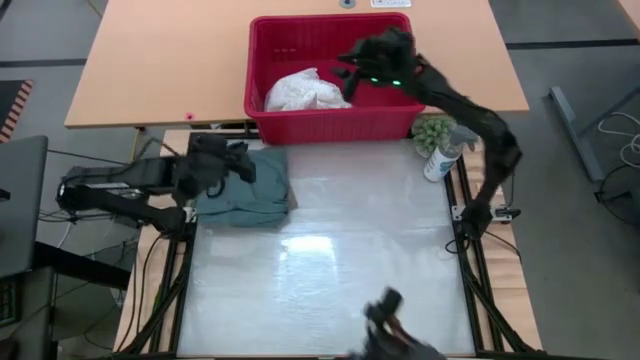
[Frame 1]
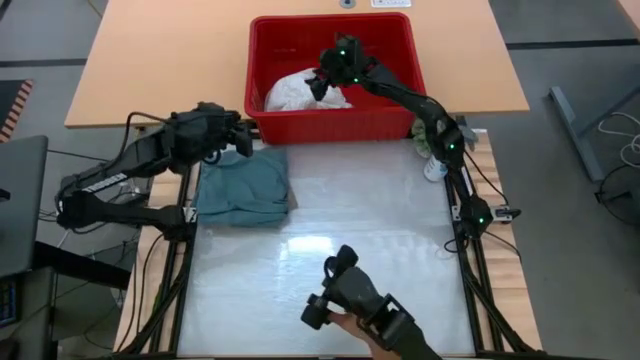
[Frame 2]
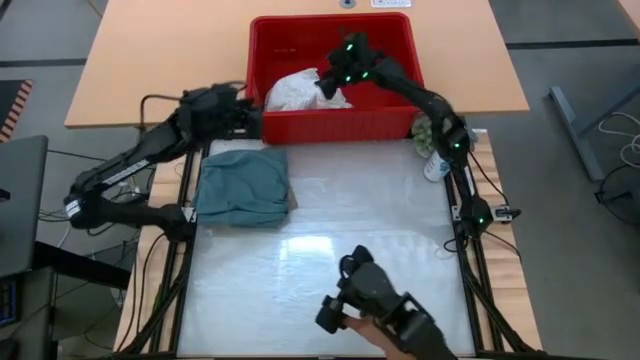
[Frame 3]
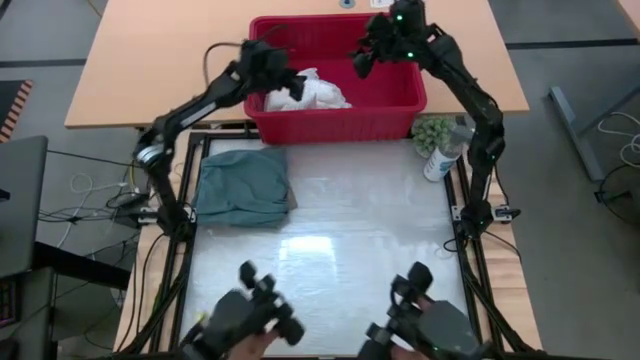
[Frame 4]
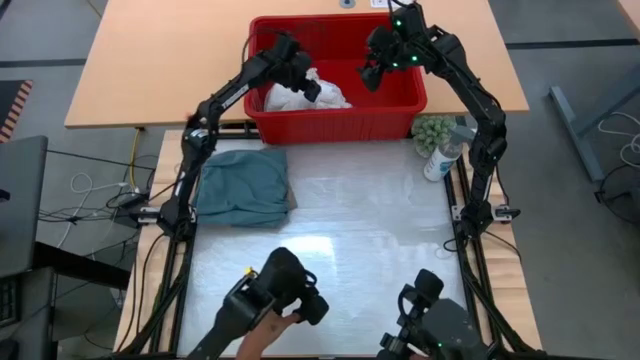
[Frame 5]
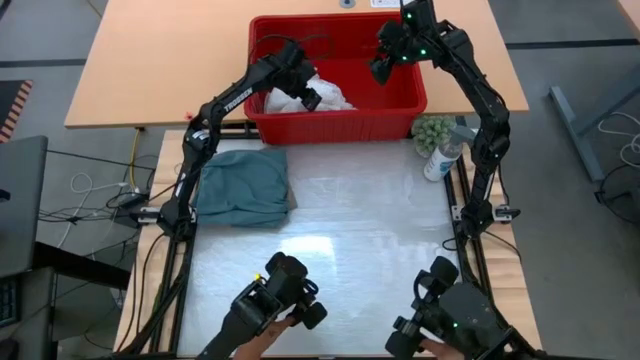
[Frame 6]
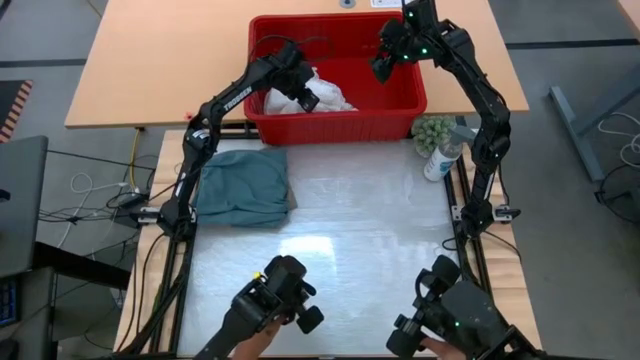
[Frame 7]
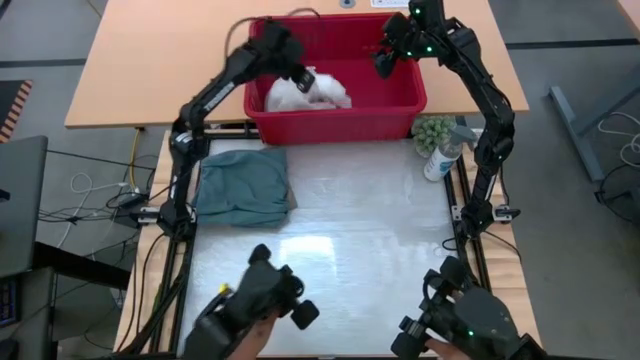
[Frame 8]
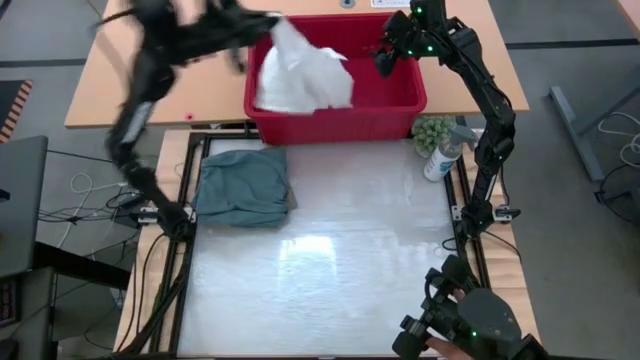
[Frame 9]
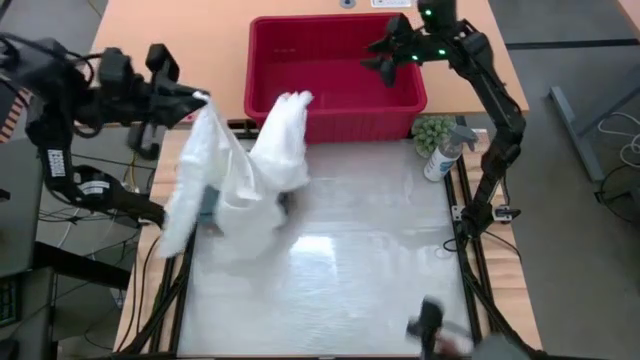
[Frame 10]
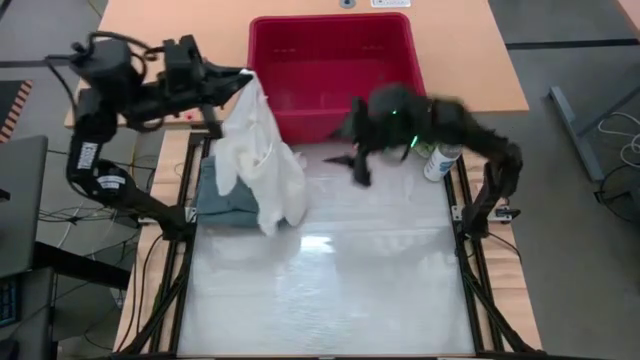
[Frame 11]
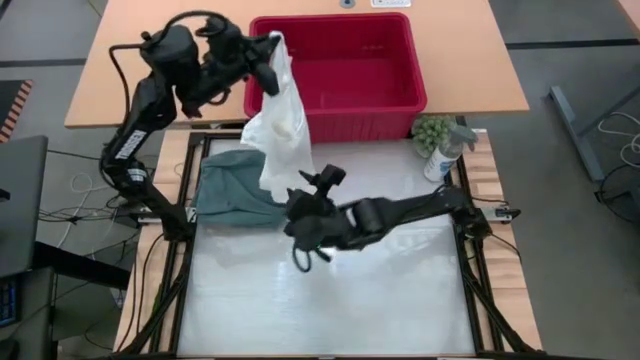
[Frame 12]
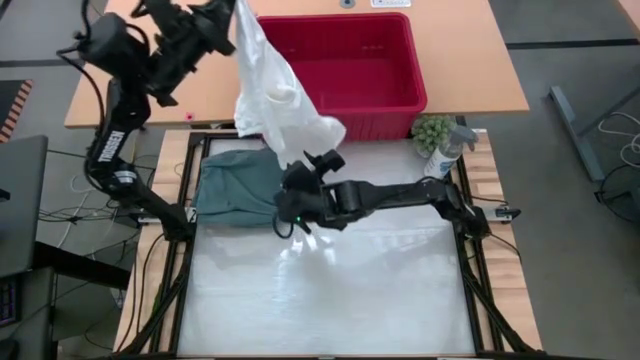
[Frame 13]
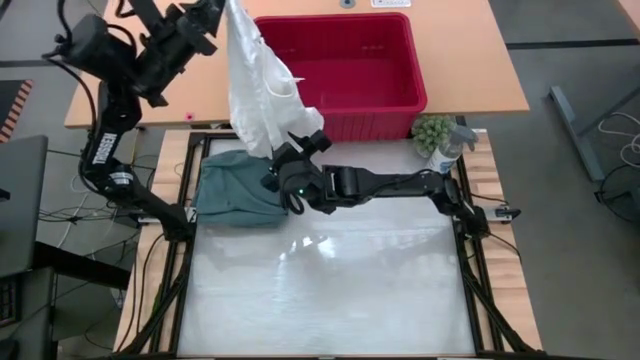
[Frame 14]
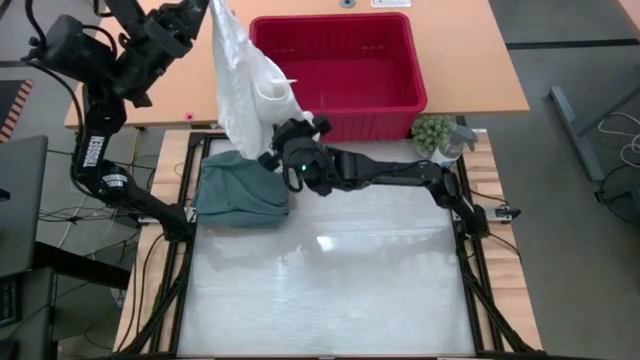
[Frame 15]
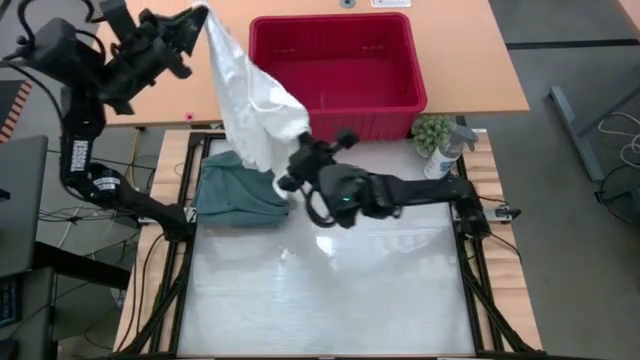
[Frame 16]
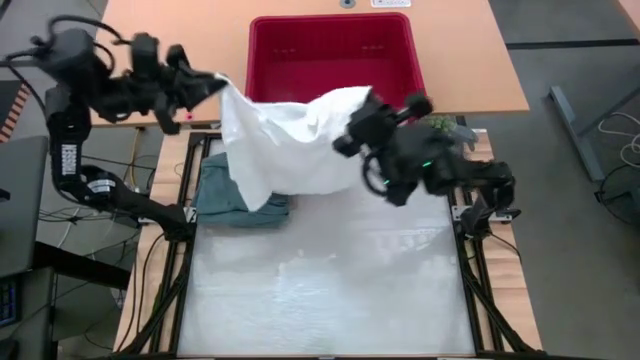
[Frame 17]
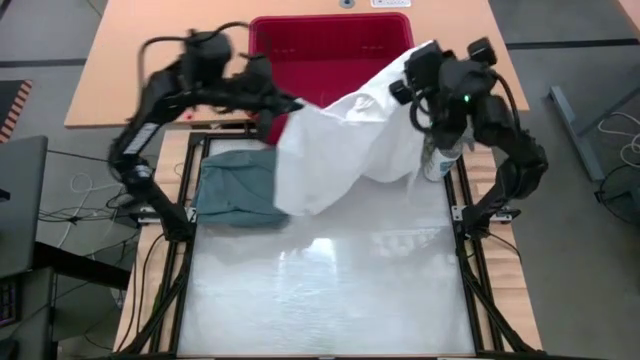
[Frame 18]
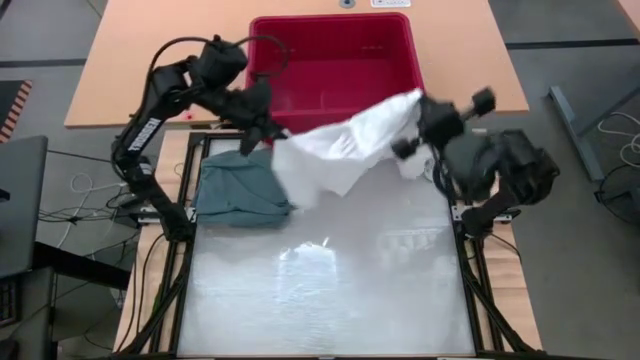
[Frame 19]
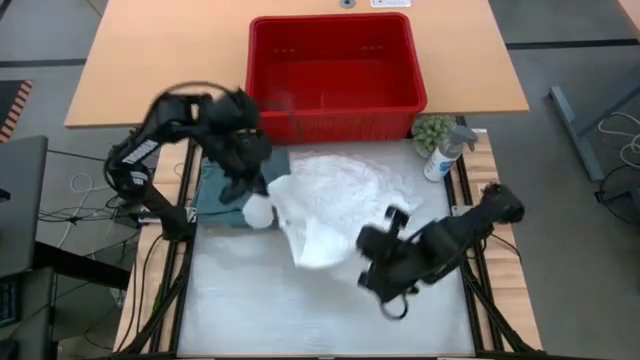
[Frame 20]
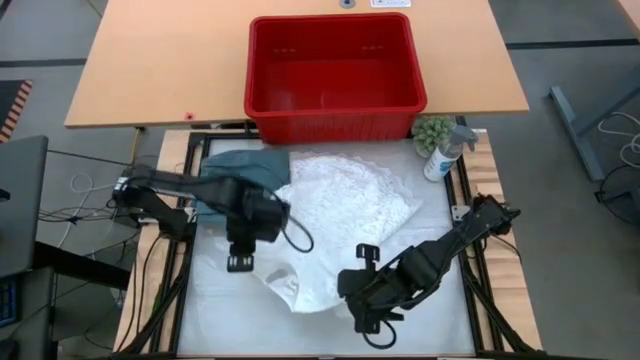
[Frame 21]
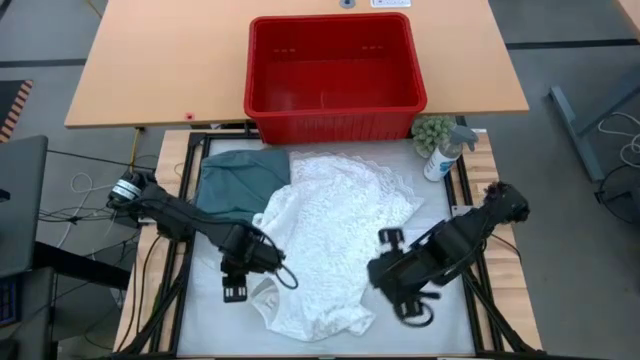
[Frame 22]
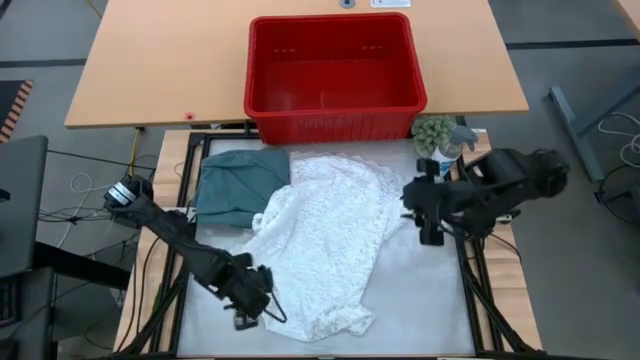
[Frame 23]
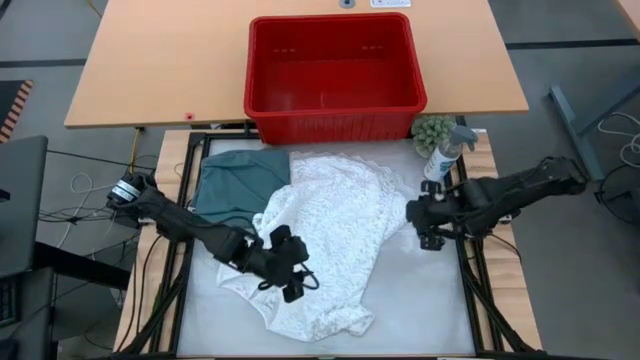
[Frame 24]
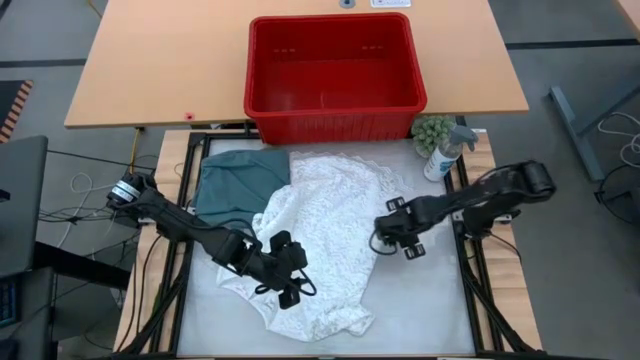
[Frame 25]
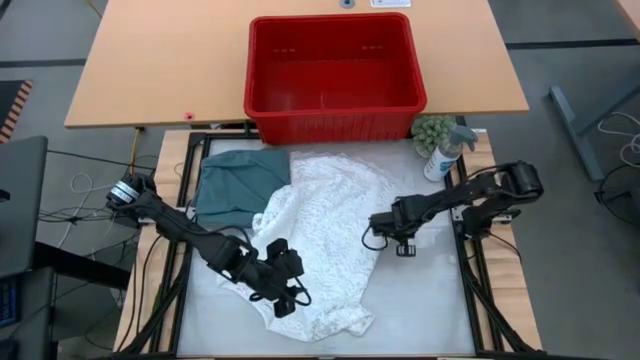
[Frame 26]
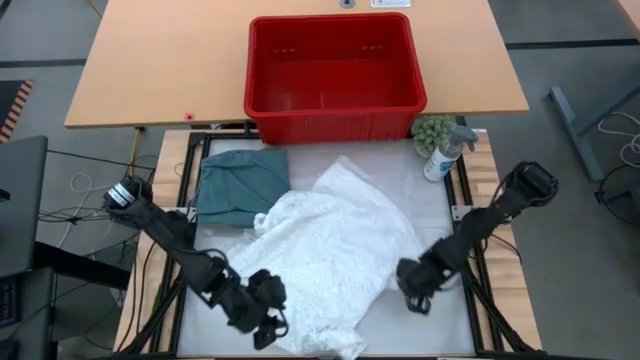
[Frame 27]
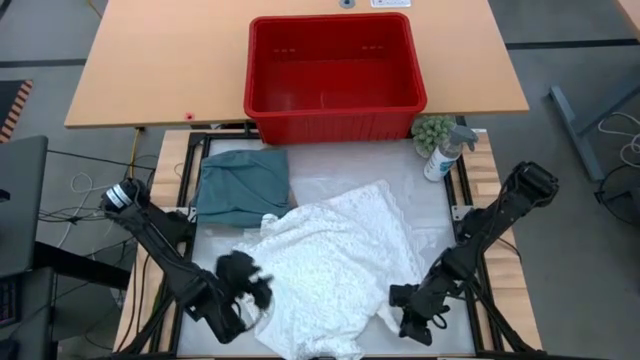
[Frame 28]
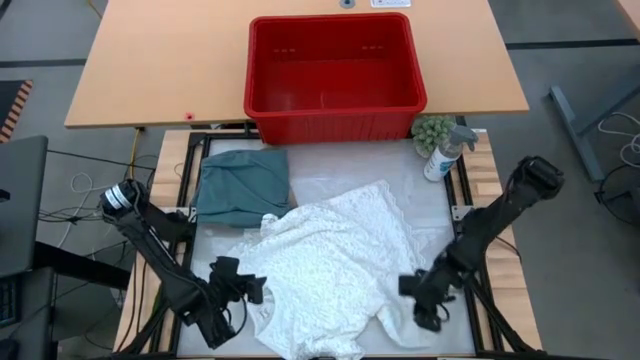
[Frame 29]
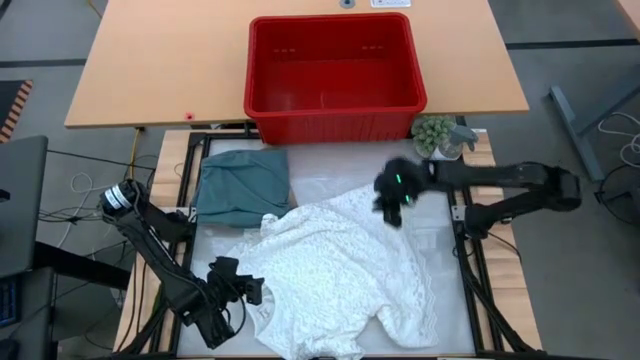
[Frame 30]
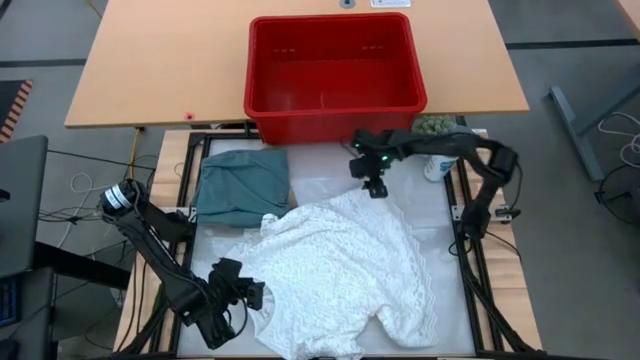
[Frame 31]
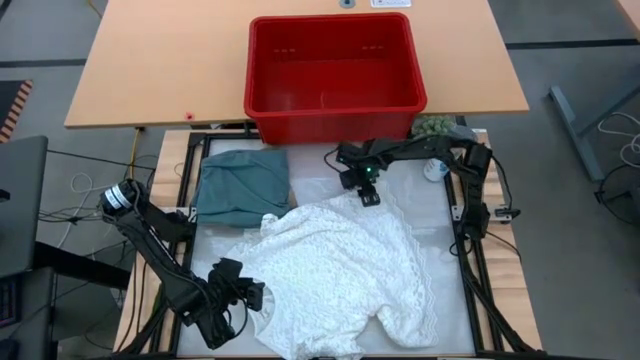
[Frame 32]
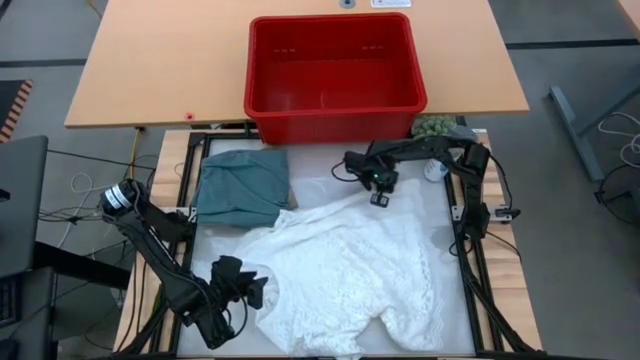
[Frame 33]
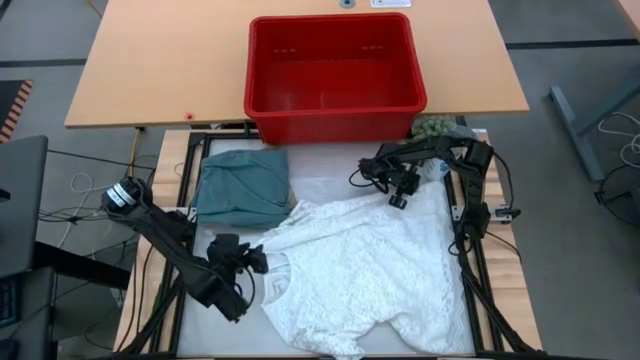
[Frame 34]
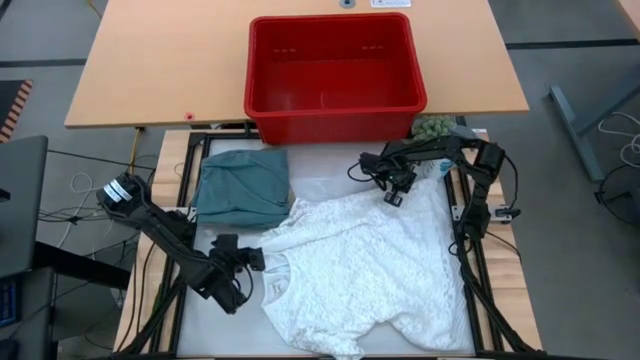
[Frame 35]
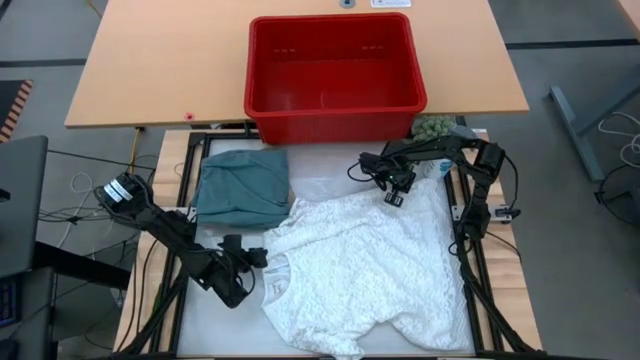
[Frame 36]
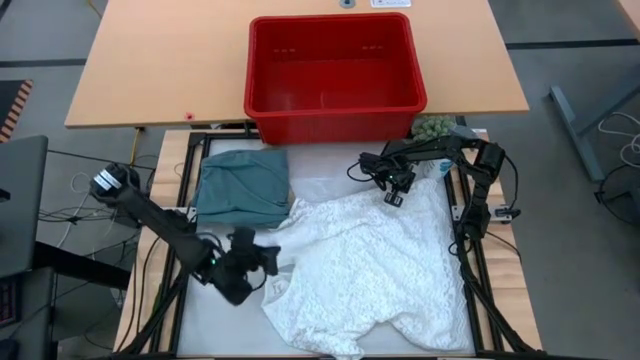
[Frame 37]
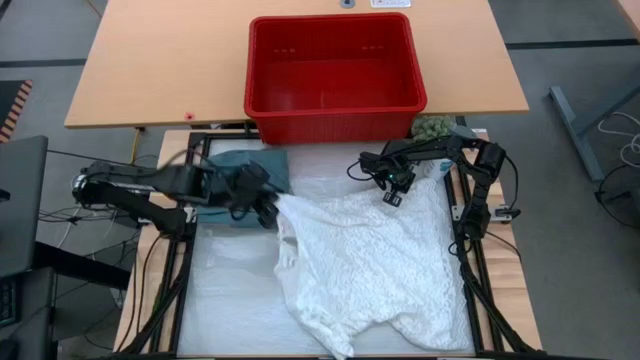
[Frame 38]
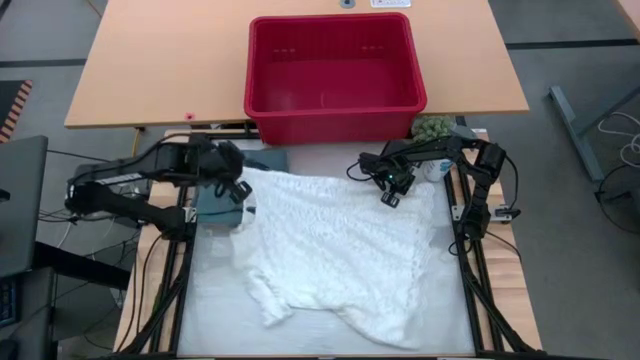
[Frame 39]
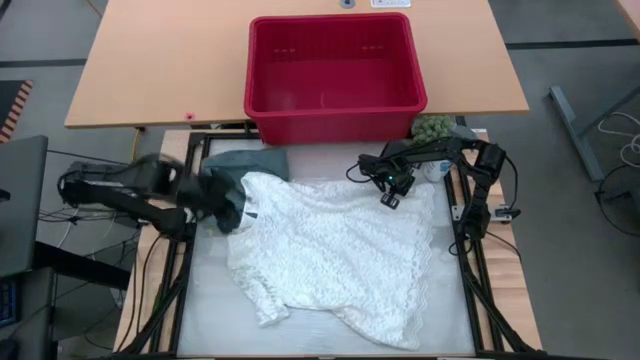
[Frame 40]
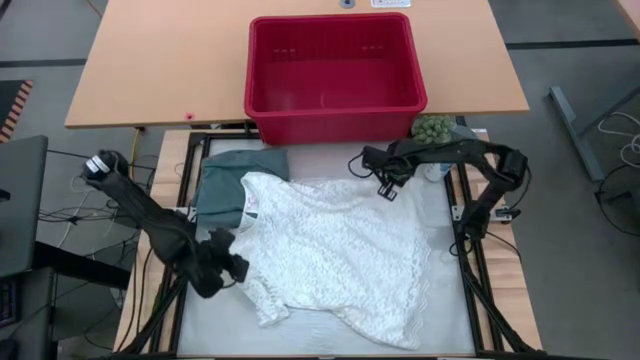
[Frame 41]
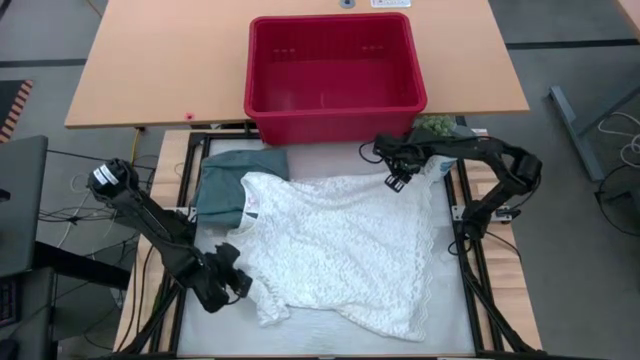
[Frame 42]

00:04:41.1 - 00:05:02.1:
Task: Fold Laundry from Bin
Fold the white shirt in the red bin

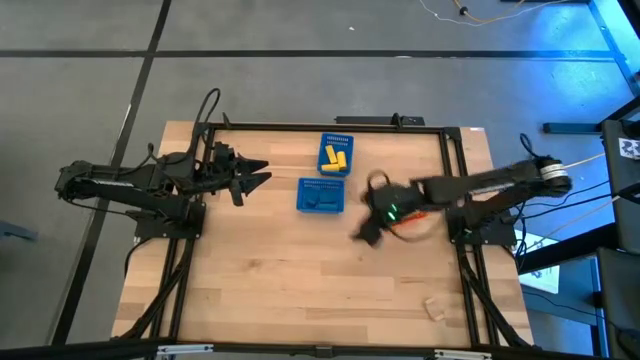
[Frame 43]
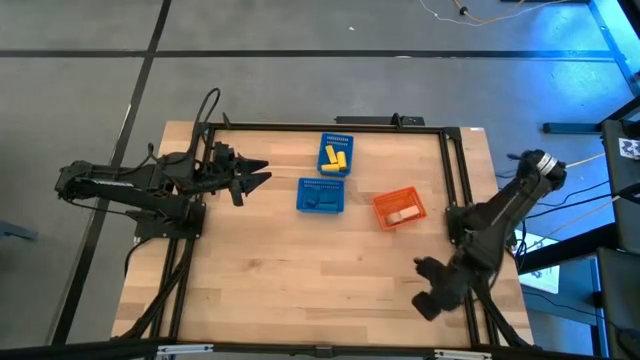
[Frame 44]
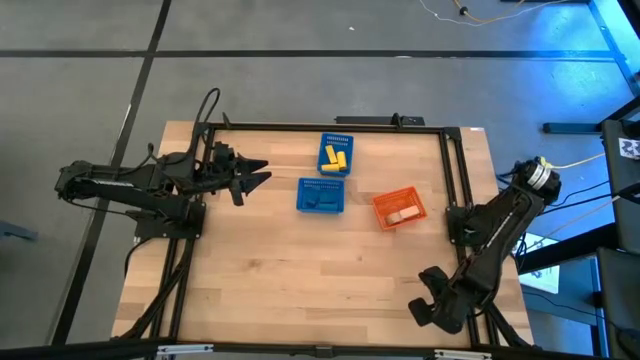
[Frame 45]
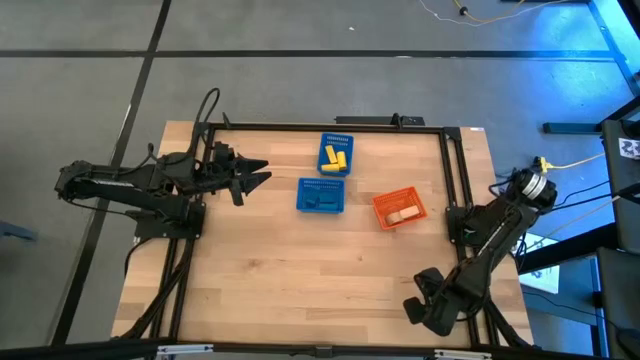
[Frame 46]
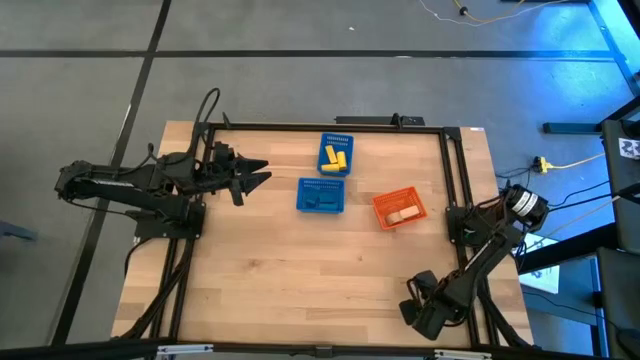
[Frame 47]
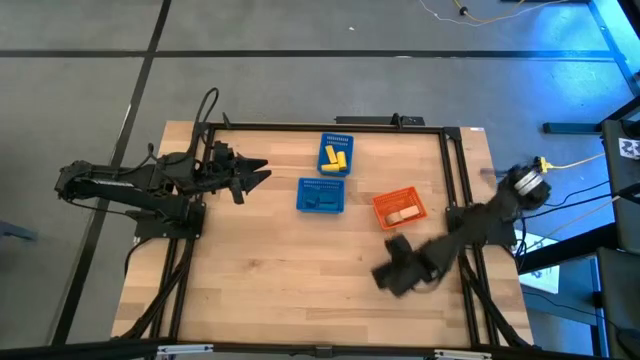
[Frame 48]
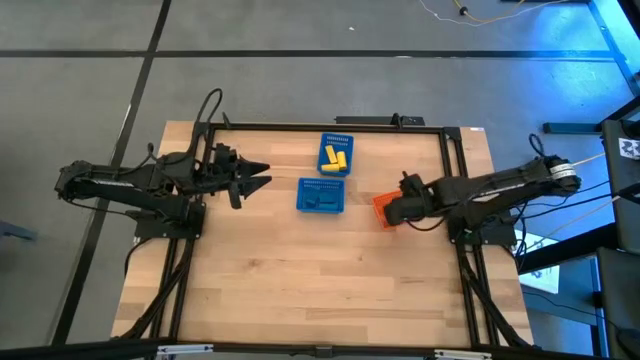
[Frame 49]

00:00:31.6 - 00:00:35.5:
Task: Sort & place blocks by color
Put the light brown block into the orange basket
